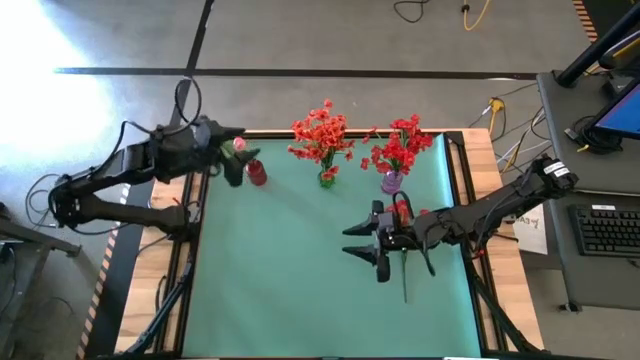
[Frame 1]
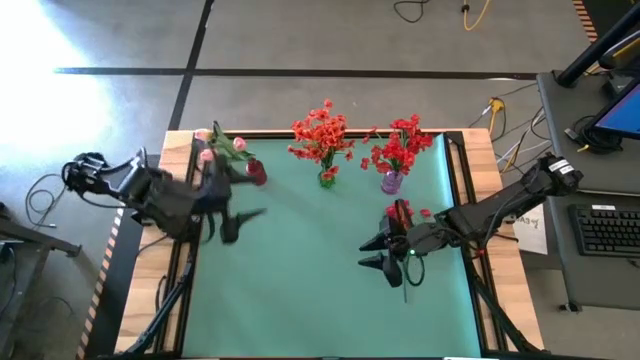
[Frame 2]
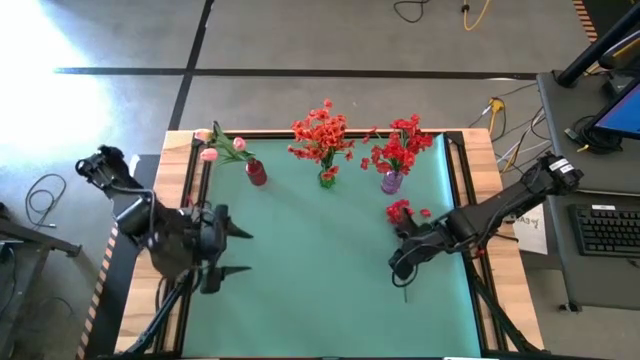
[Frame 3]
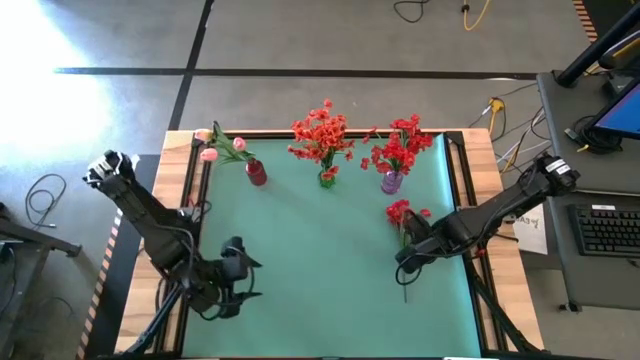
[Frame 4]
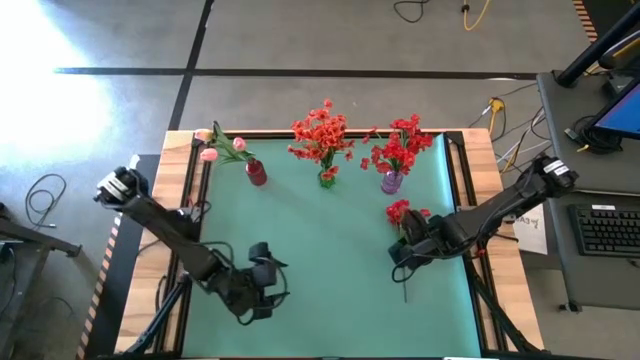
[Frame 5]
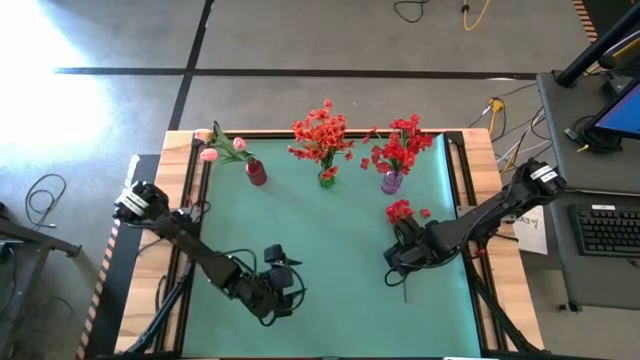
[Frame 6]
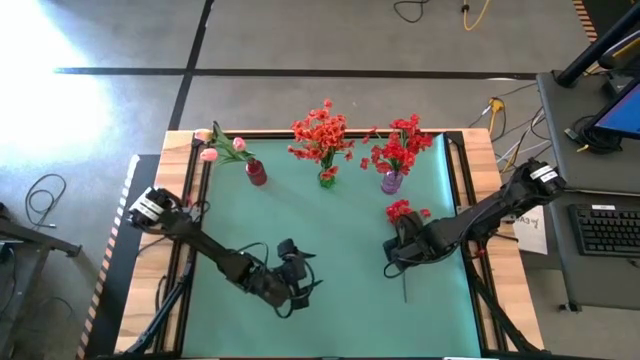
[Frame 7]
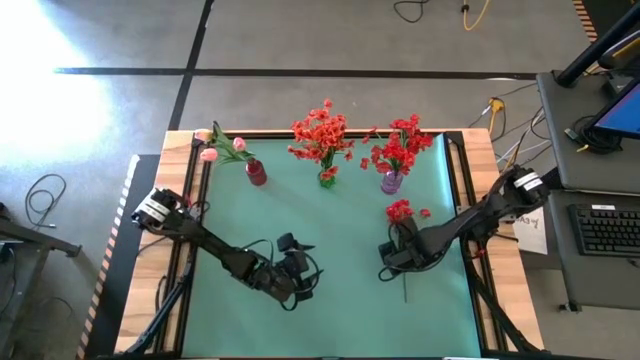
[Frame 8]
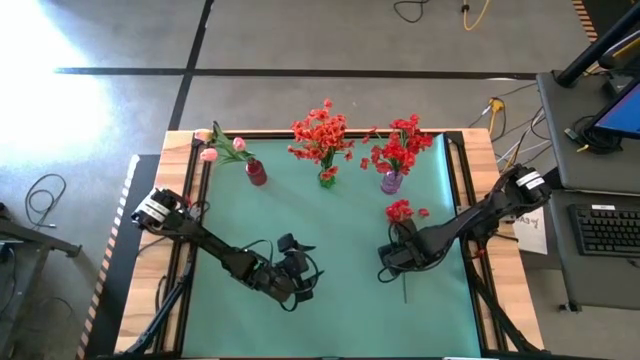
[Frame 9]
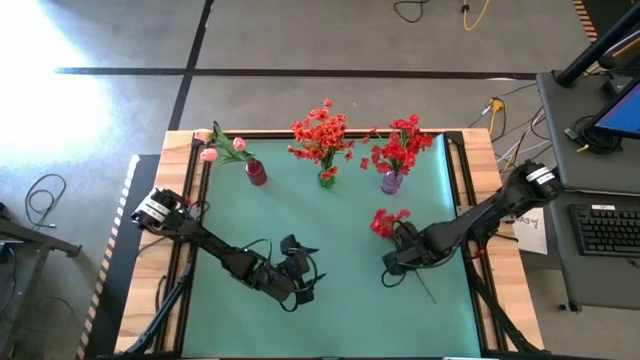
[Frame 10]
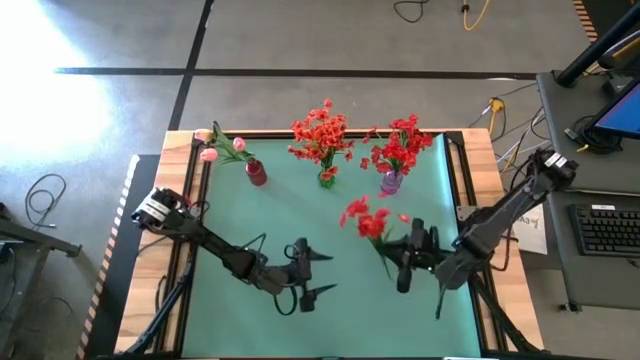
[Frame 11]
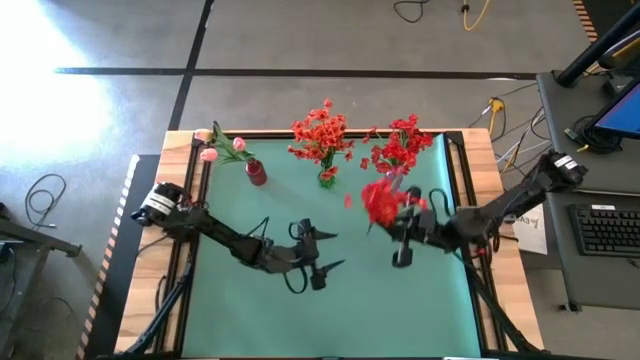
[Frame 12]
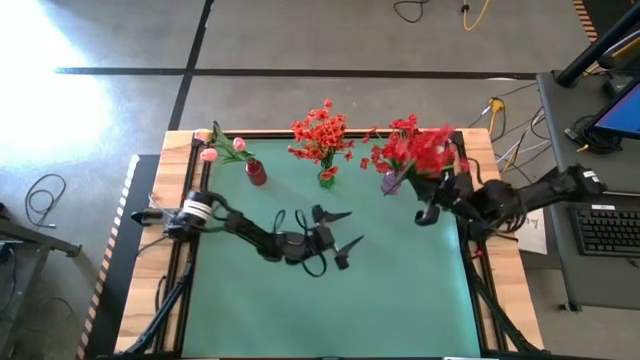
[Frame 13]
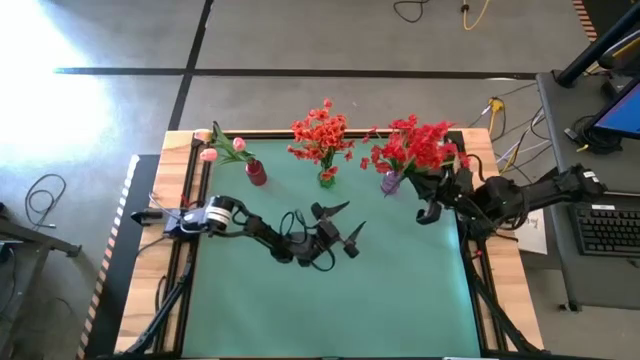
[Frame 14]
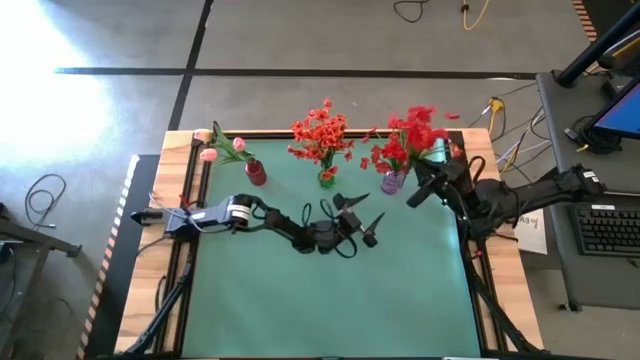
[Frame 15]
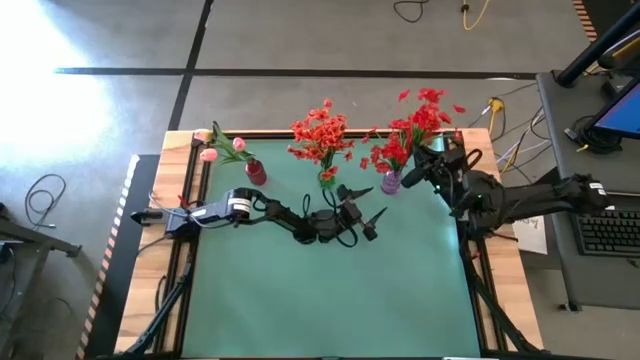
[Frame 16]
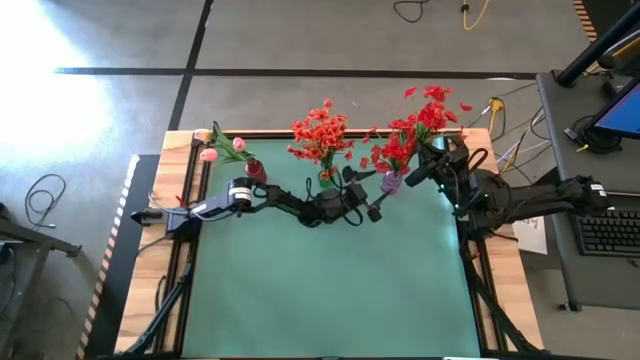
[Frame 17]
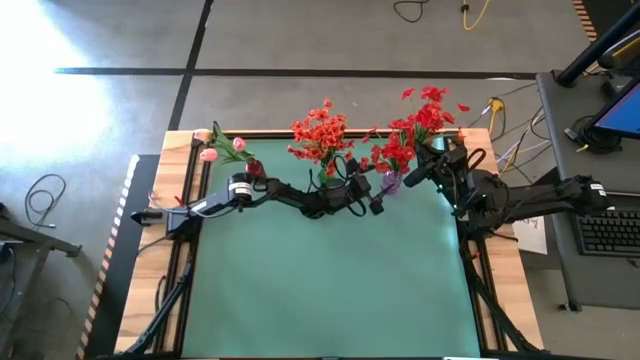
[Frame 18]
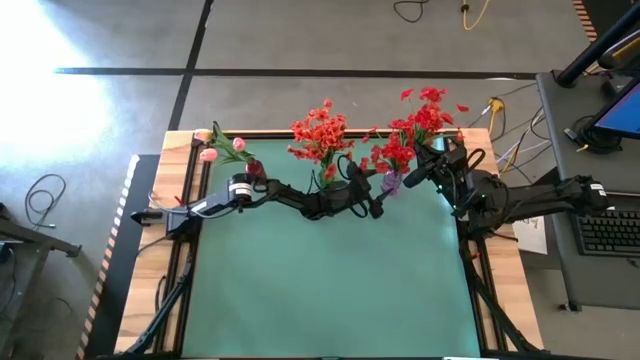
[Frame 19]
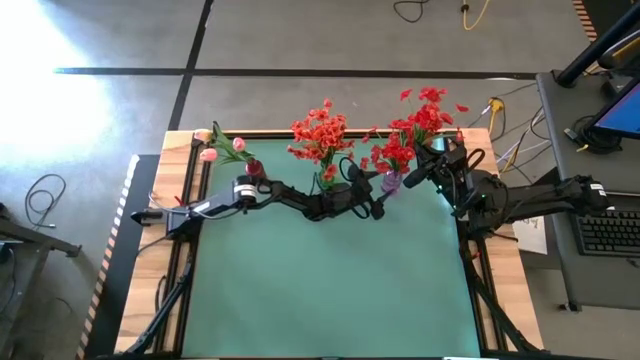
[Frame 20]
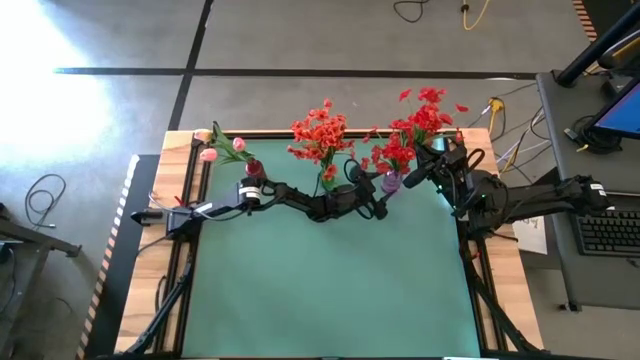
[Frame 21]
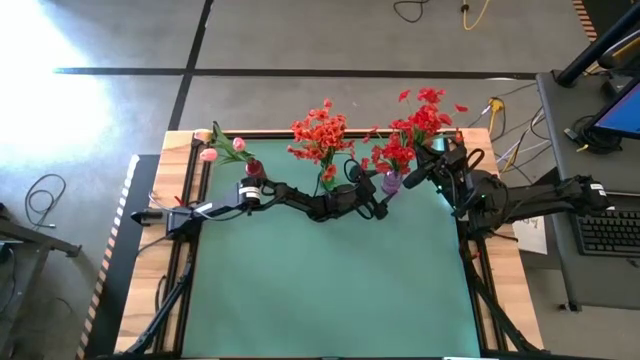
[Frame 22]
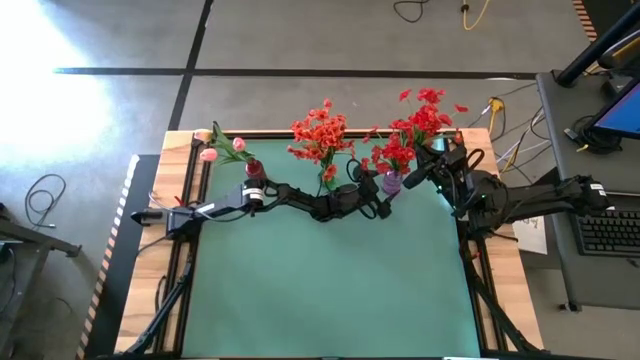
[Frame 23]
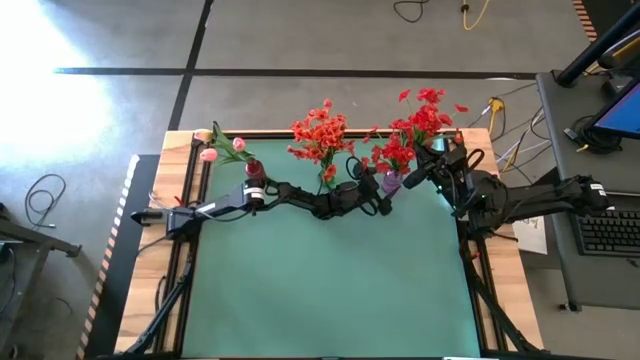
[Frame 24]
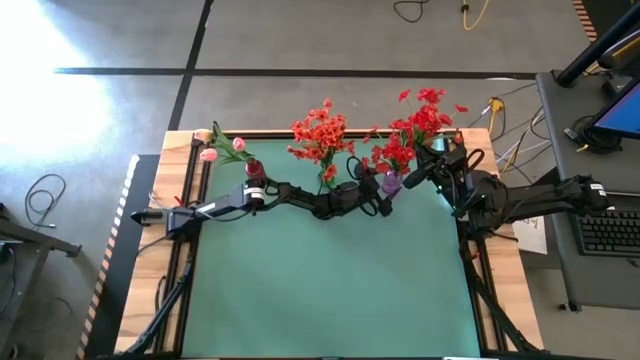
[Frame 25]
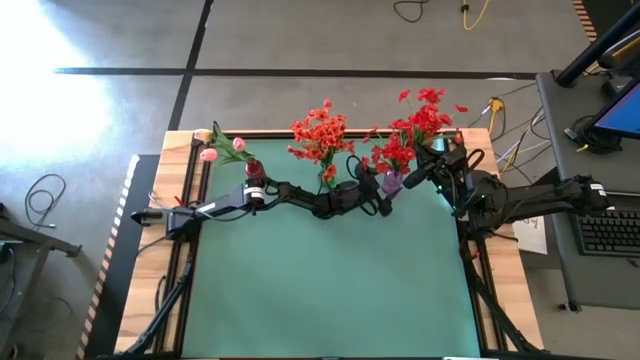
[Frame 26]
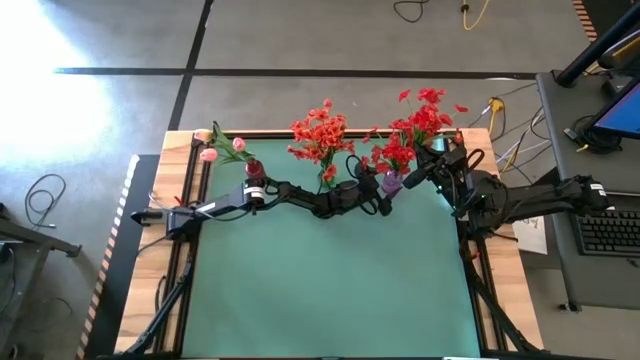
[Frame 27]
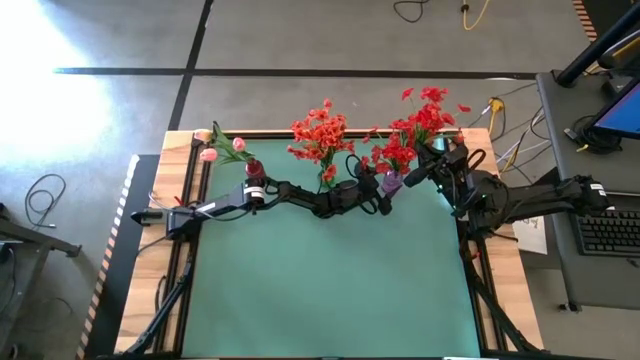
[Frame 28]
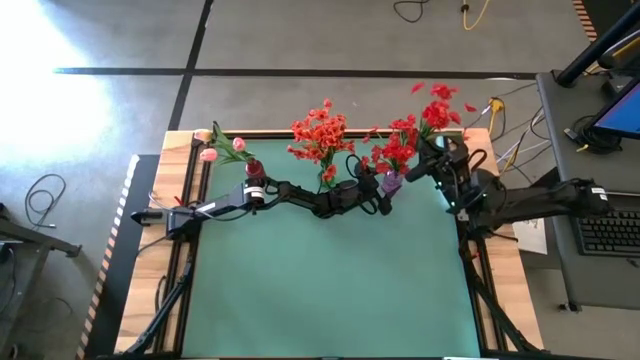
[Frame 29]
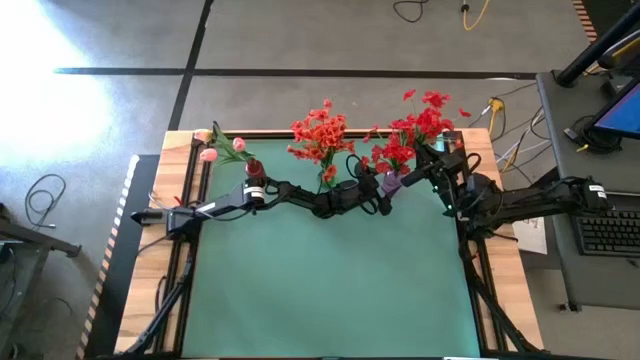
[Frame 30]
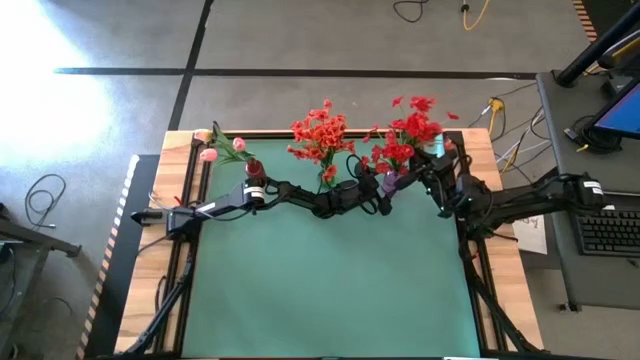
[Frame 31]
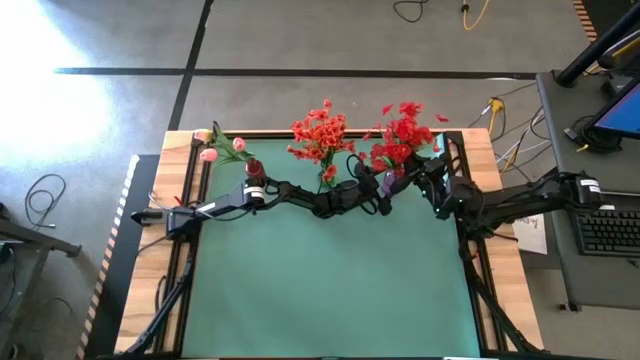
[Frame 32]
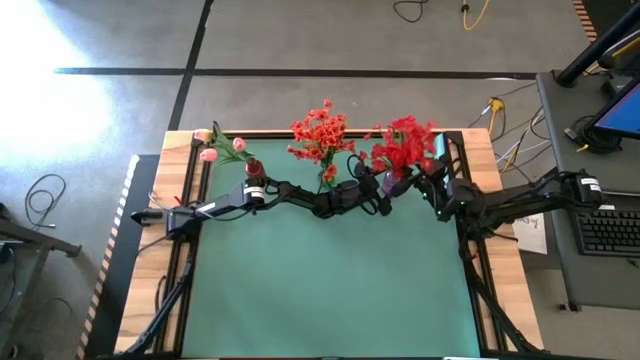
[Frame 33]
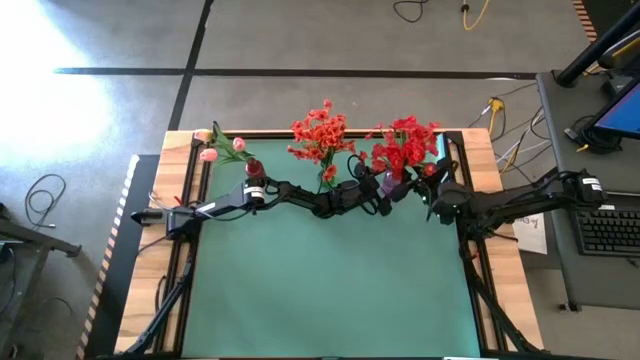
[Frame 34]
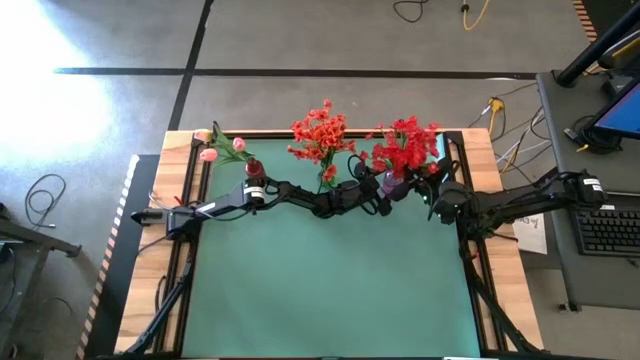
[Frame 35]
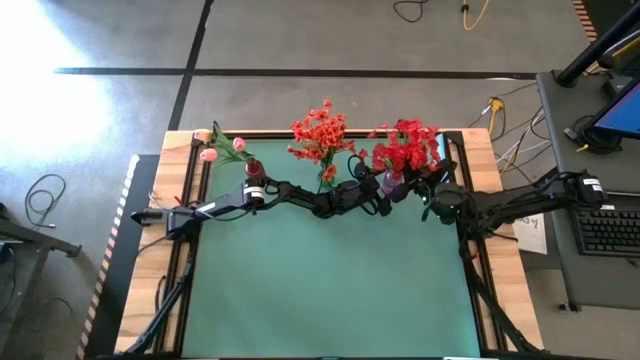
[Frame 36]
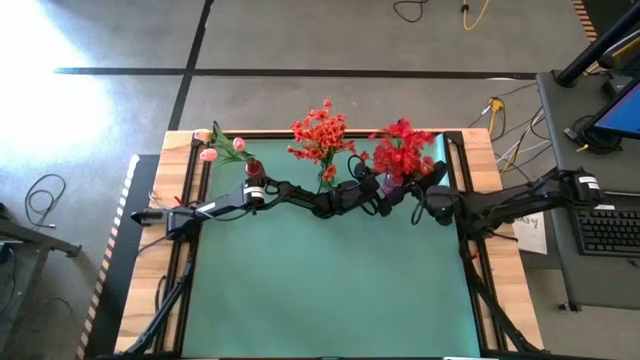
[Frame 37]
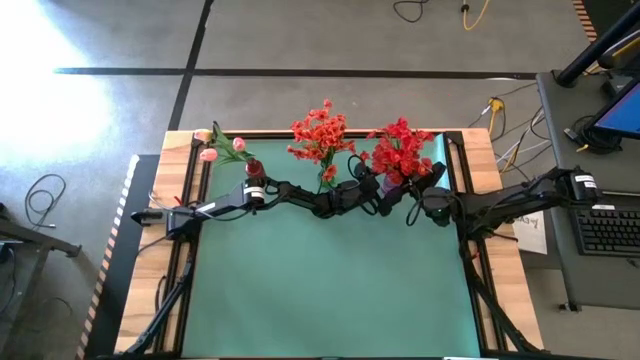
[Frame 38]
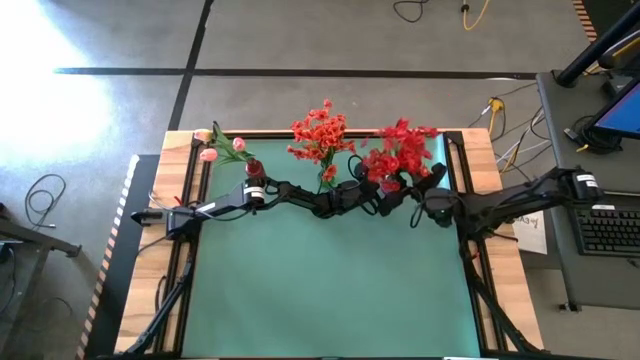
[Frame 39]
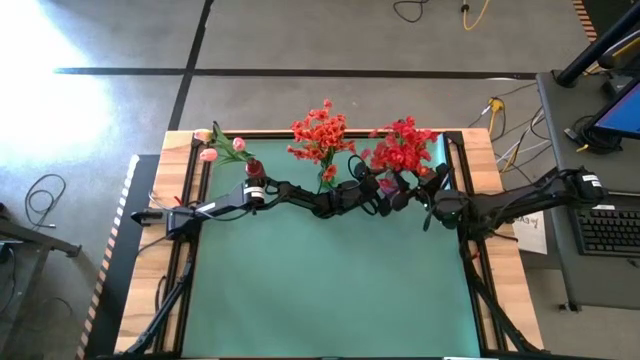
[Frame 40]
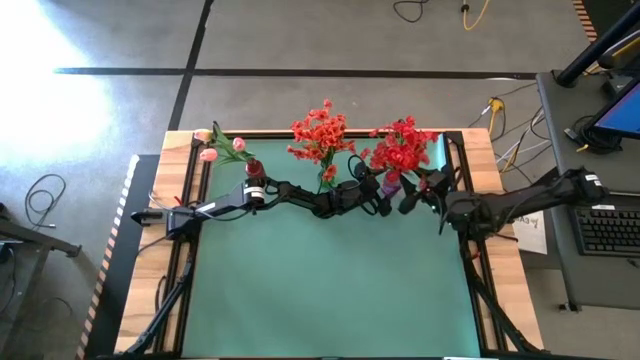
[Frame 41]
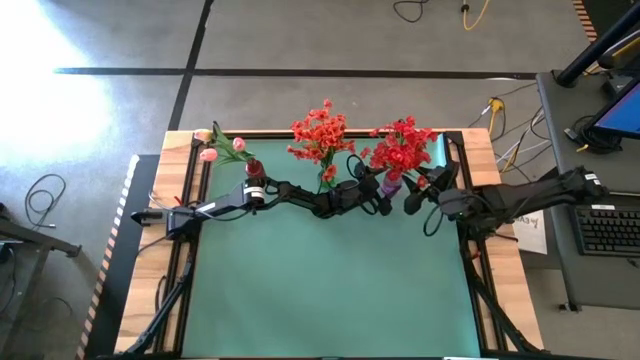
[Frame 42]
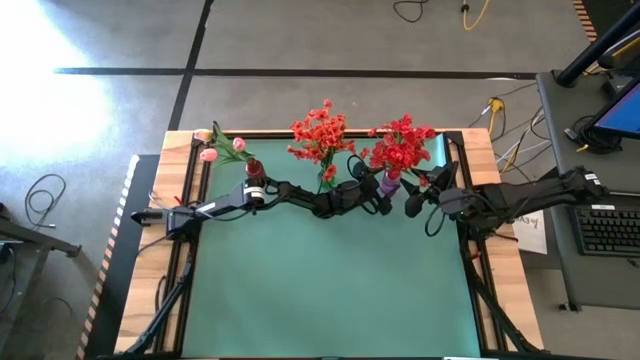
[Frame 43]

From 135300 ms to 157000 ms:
Task: Sort flowers into vase by color
Put the red flower in the violet flower vase
